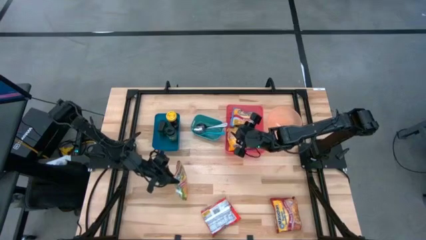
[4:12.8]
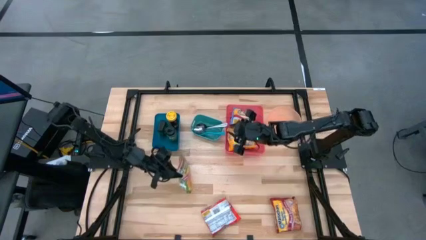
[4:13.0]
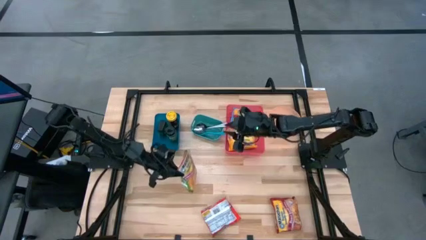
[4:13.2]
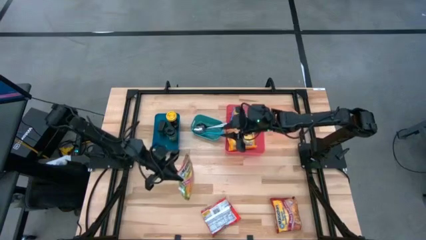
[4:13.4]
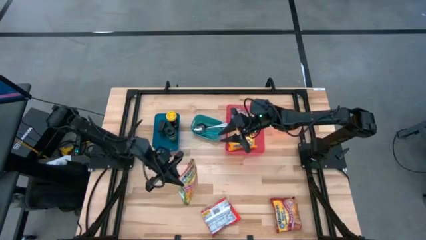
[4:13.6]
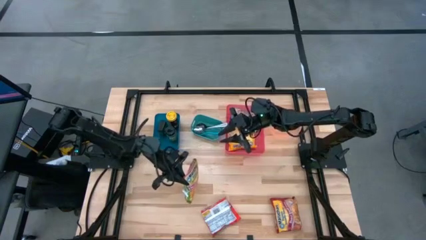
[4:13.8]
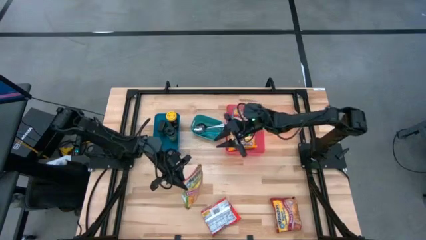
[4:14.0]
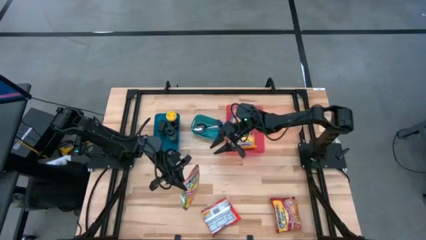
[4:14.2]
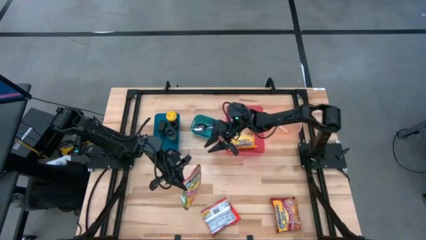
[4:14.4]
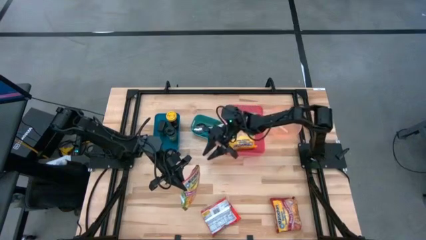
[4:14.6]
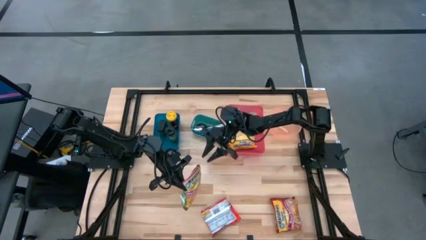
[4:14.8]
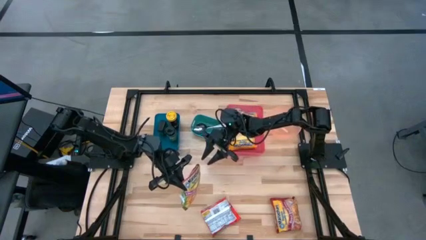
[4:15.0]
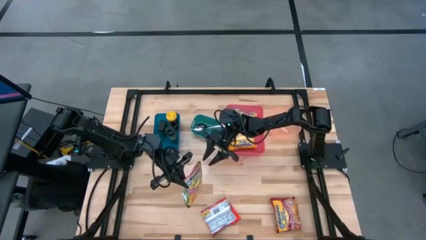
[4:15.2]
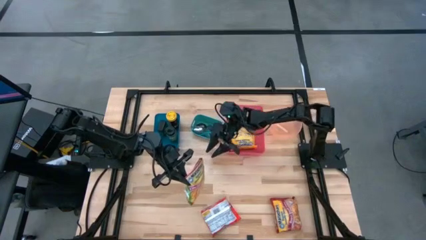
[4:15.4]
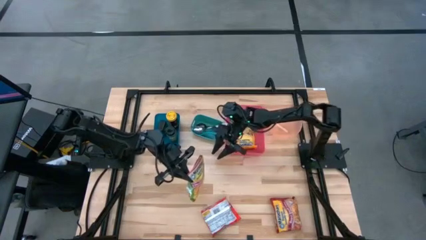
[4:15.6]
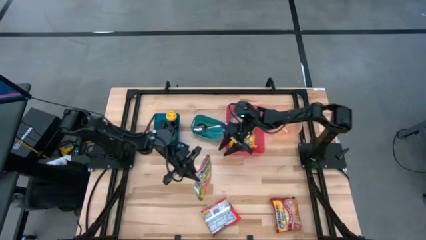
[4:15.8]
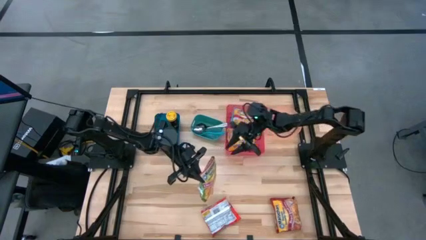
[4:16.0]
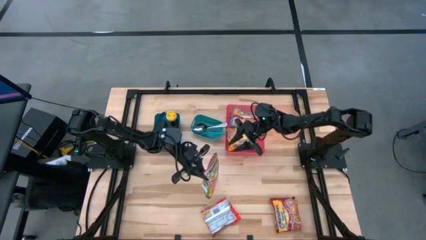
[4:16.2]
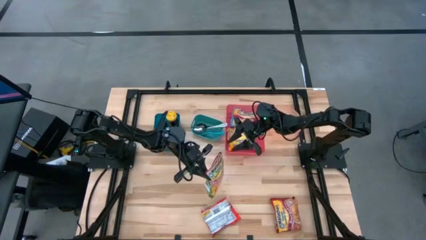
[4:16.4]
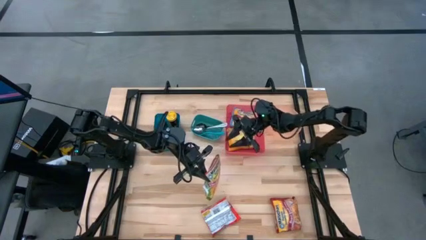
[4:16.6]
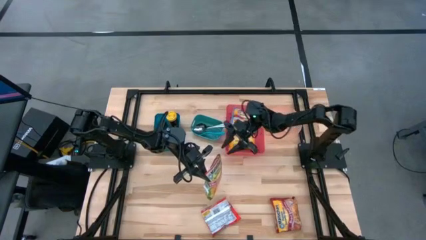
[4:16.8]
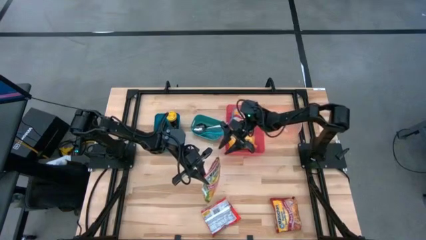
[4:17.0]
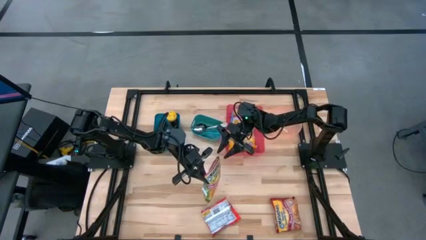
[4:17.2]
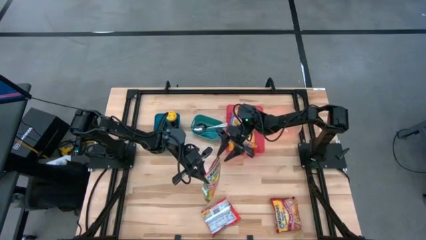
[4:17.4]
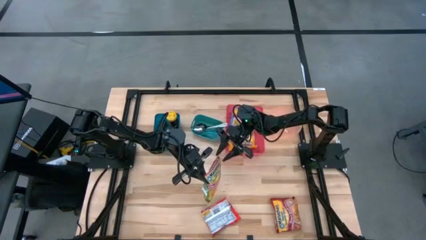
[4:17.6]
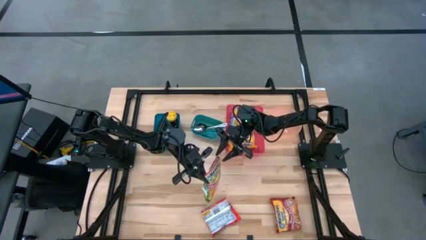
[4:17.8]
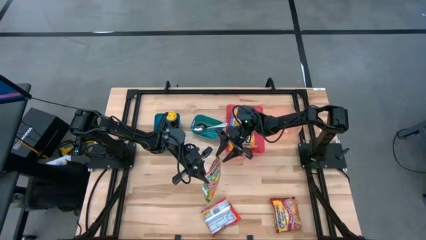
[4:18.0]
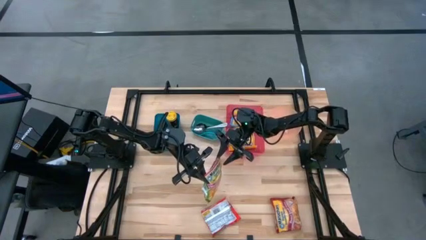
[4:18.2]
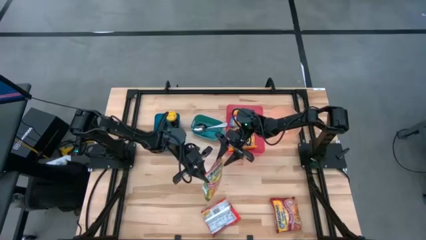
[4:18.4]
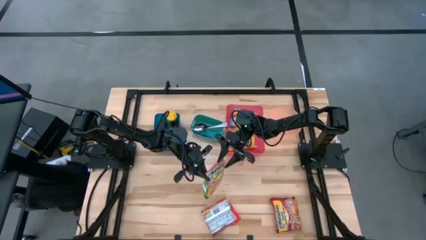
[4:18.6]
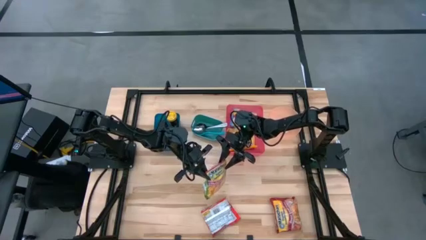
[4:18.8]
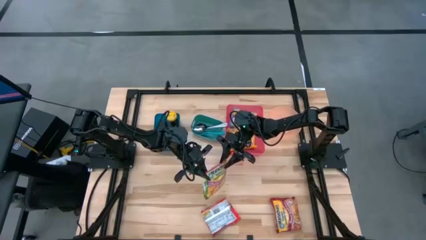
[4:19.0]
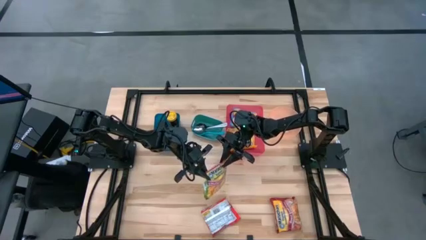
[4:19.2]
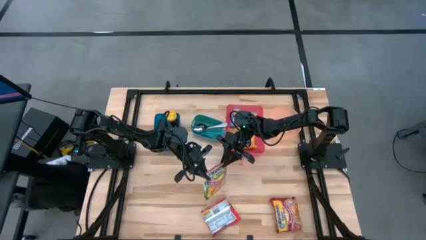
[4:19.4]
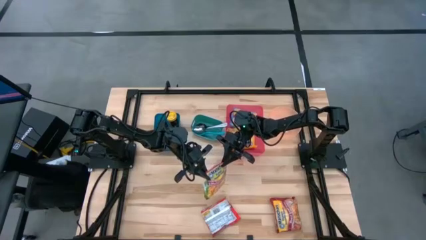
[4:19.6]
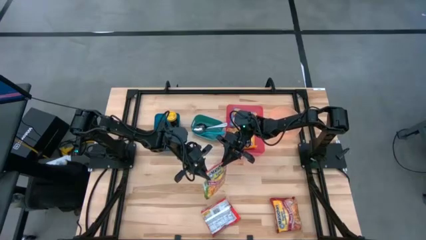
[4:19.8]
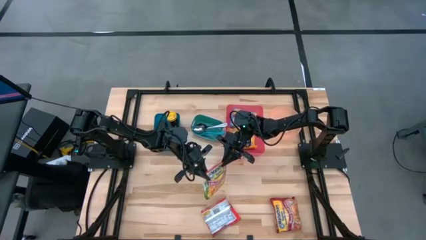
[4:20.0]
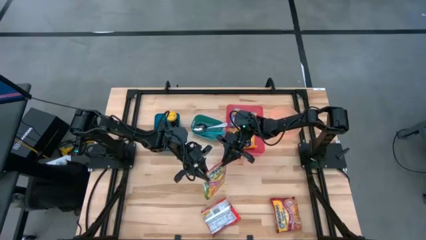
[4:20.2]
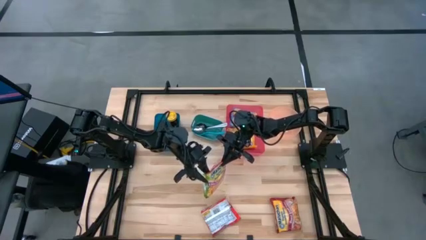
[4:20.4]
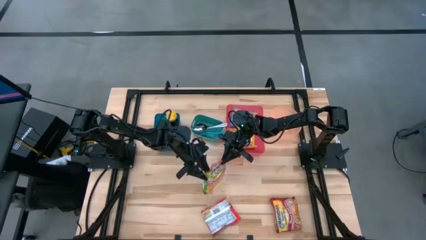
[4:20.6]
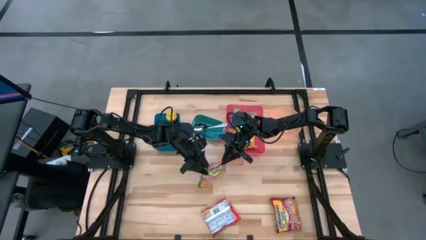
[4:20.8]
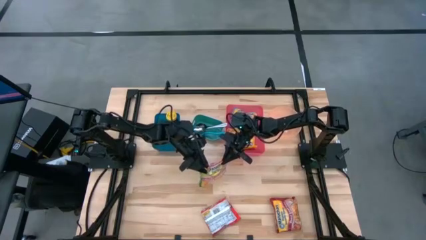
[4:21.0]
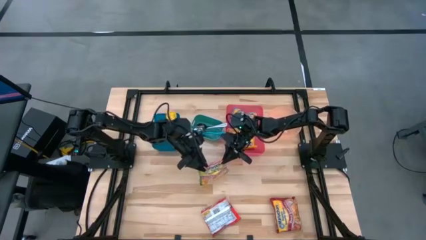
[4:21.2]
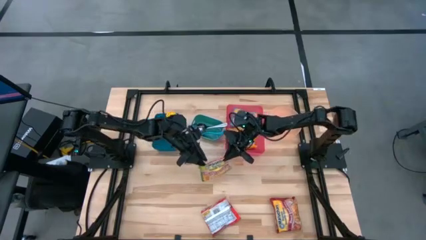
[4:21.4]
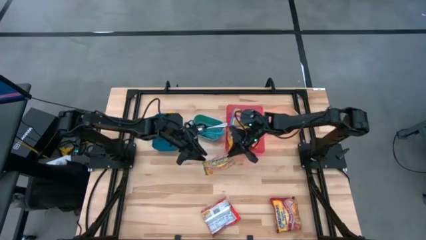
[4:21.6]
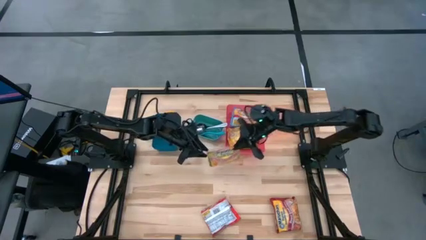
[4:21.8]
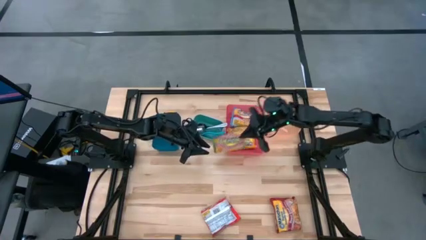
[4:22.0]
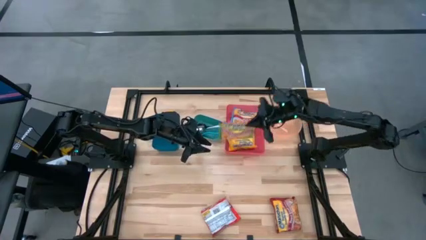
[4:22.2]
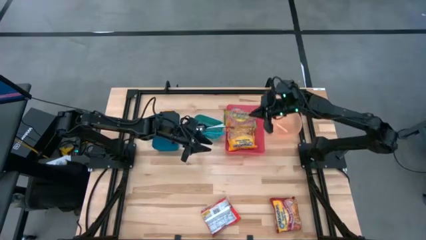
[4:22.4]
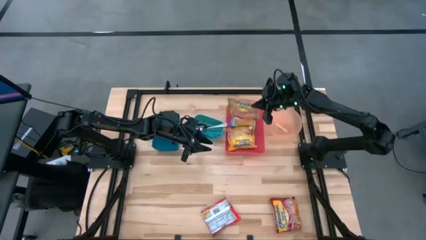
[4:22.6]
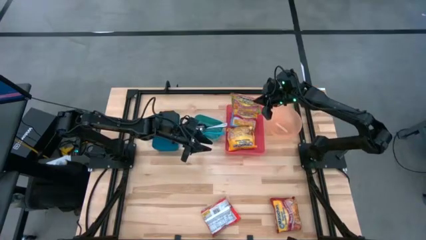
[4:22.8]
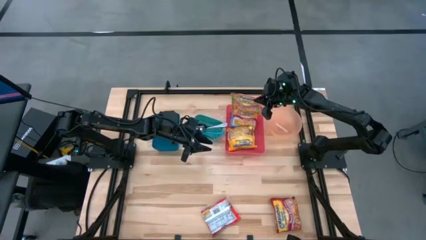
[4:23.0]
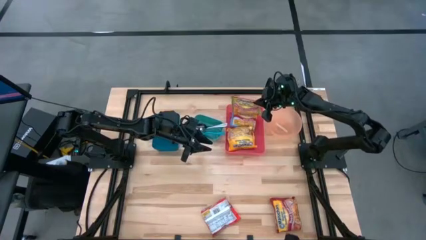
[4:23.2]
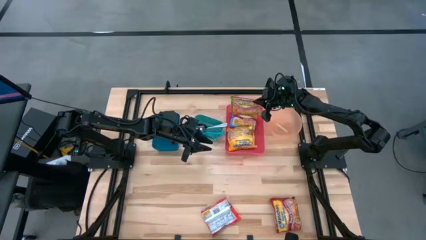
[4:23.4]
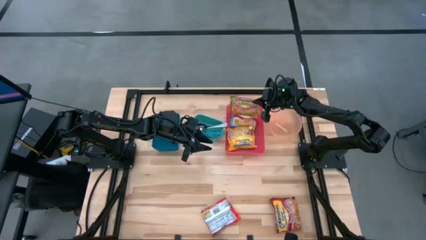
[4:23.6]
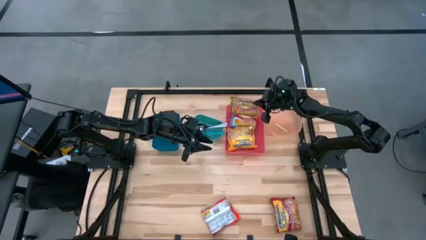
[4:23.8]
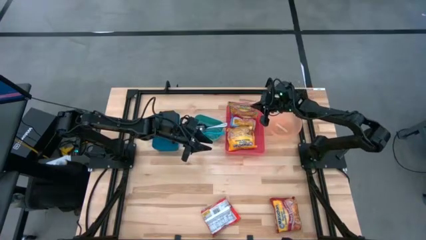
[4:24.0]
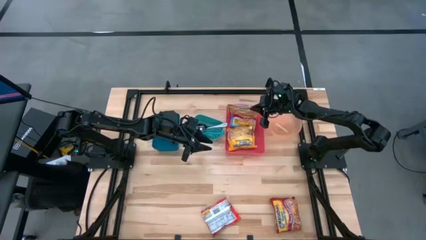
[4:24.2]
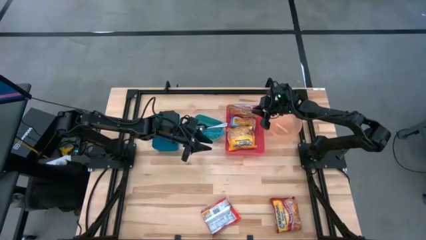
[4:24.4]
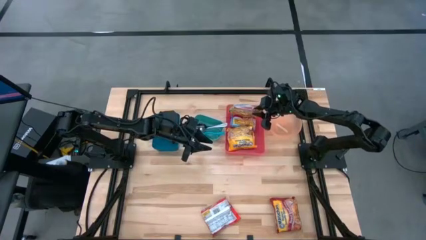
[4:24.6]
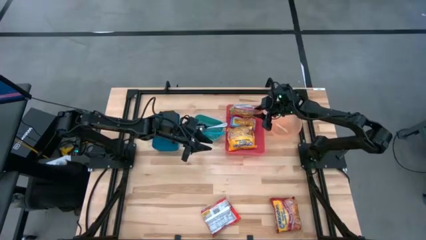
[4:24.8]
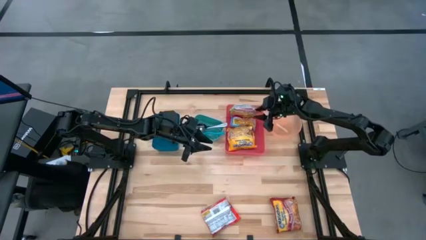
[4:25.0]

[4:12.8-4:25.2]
Task: Pick & Place Food Item
Put the green noodle pack into the red bin

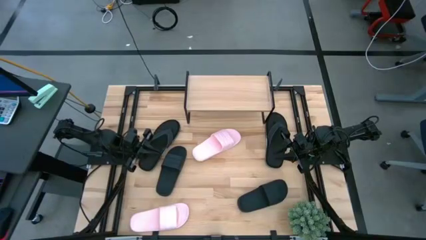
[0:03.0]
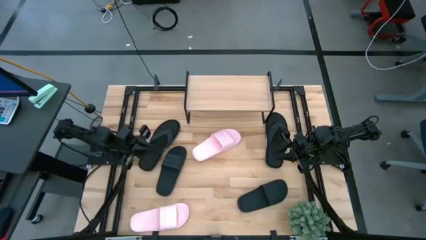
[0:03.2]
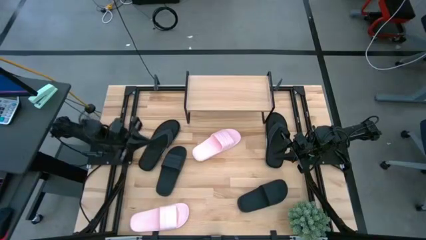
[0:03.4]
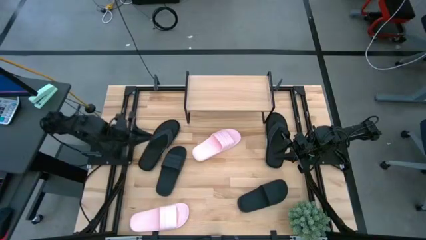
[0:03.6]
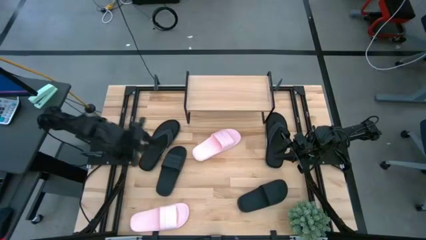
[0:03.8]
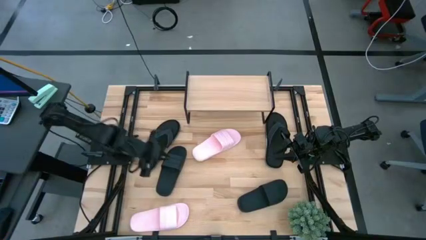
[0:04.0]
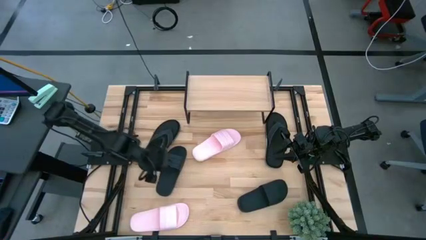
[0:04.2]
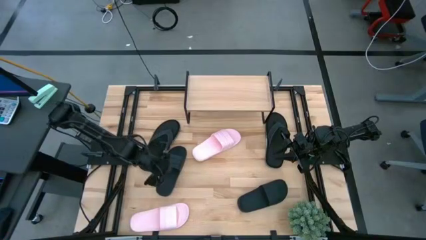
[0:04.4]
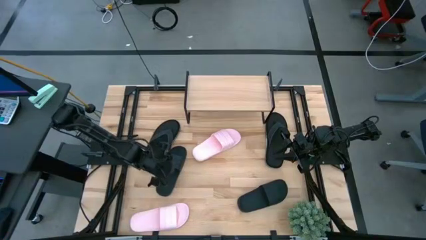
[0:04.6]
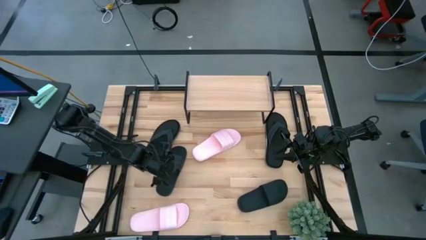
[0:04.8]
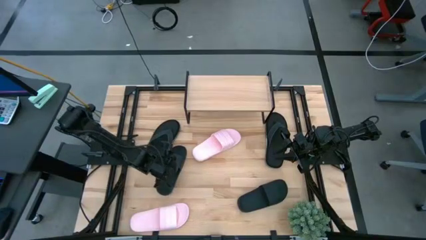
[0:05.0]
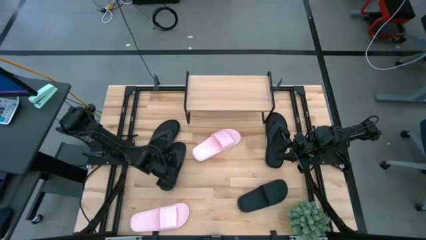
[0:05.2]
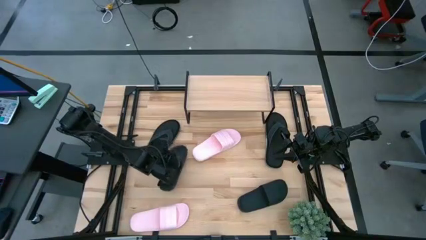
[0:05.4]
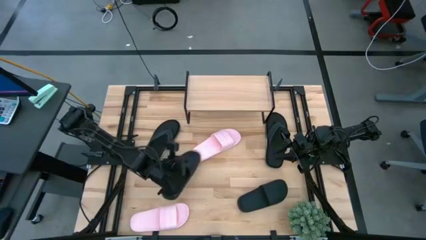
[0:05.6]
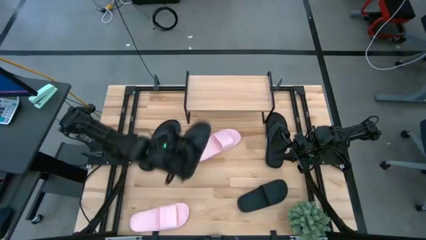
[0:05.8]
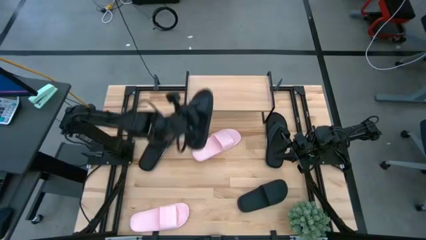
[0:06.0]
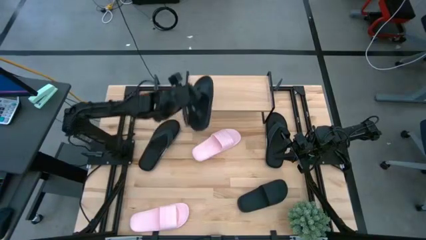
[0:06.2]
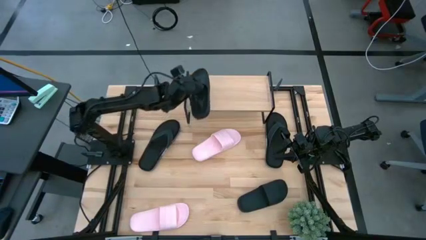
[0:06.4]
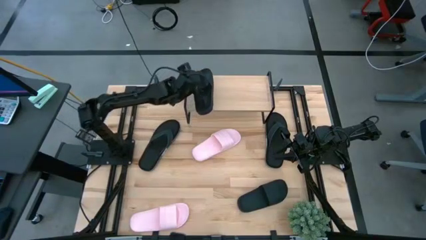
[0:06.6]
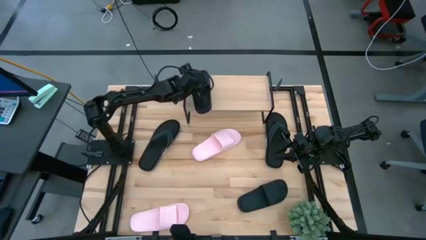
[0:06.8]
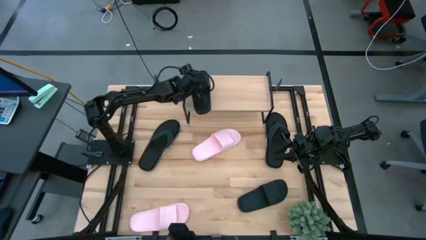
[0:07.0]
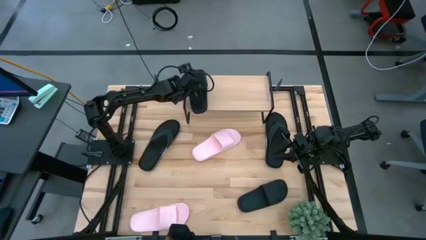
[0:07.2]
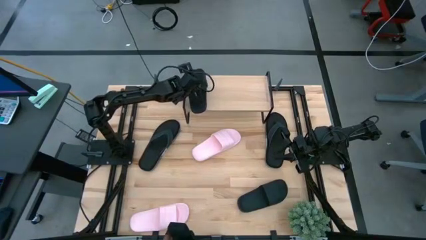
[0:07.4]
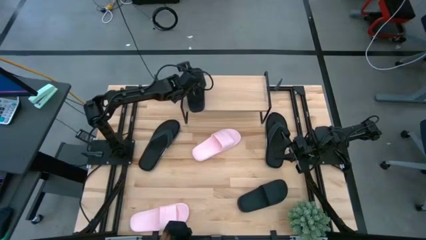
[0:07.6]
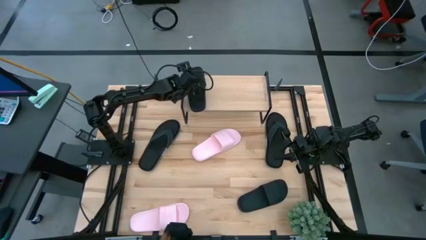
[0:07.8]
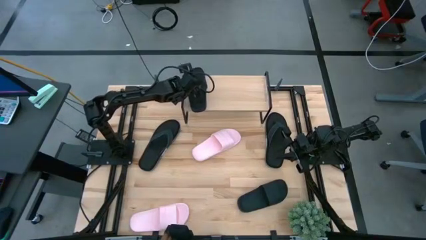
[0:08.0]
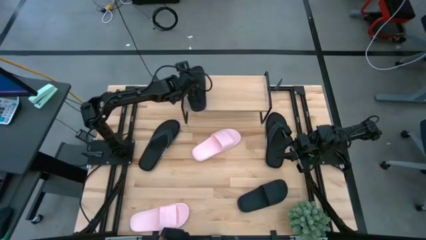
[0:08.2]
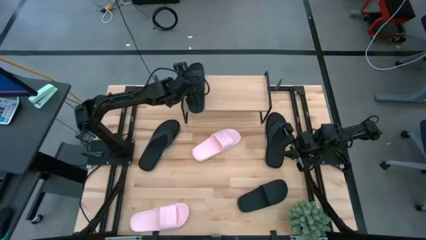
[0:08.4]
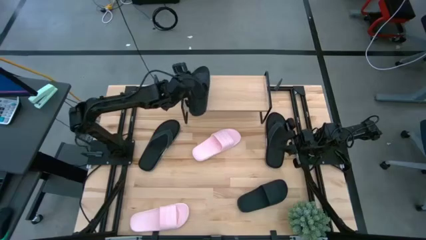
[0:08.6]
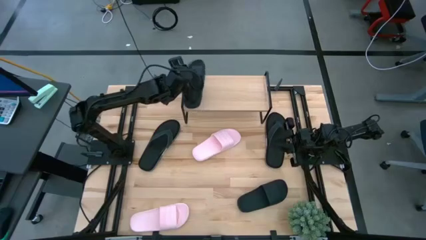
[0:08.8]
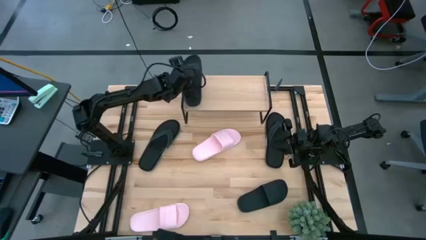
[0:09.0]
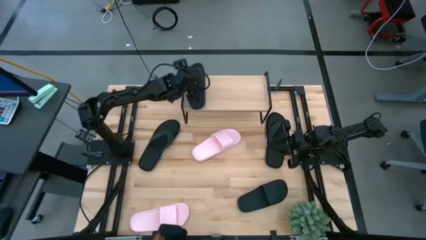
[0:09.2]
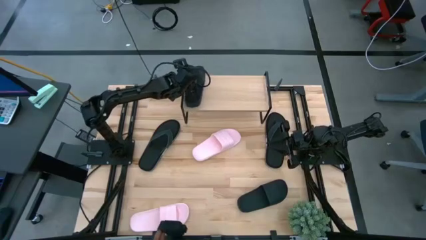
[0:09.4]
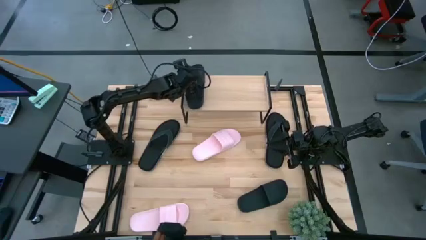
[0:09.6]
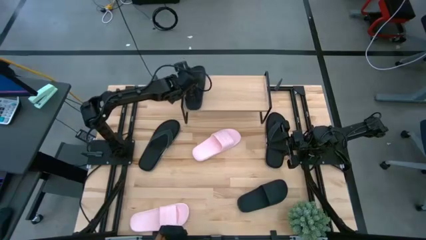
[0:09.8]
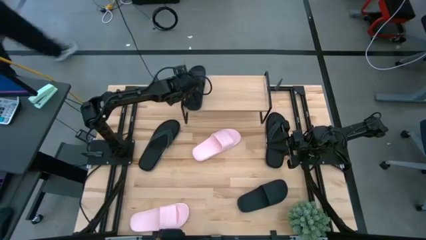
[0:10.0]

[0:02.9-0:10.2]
Task: Pick and place slides into the shelf
Put the top black slide on the shelf
